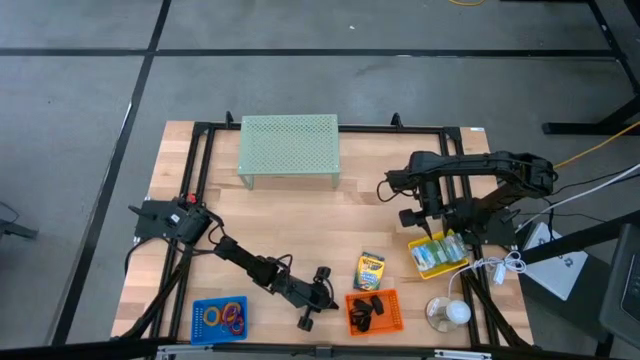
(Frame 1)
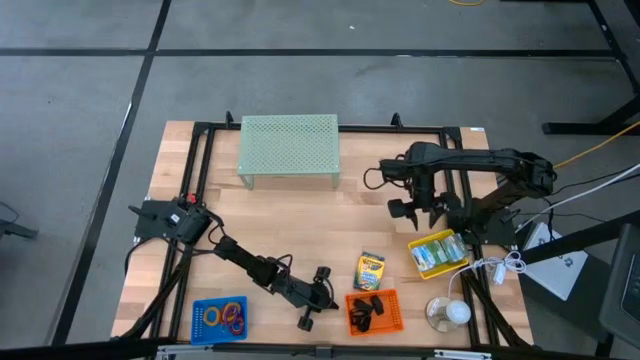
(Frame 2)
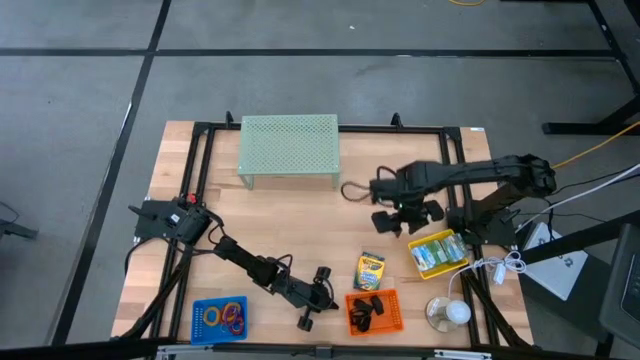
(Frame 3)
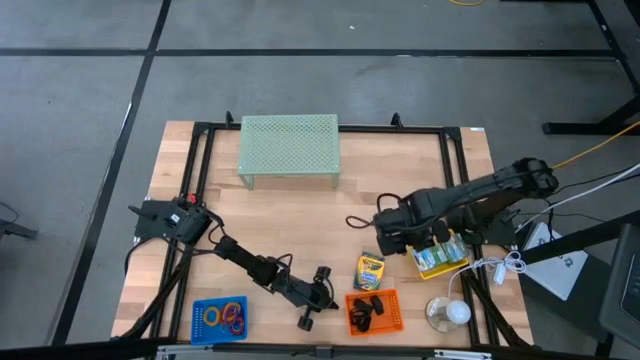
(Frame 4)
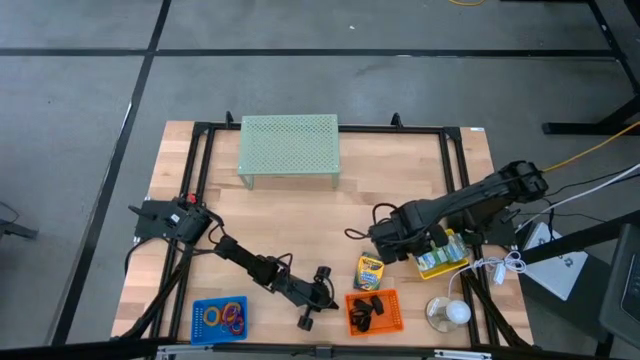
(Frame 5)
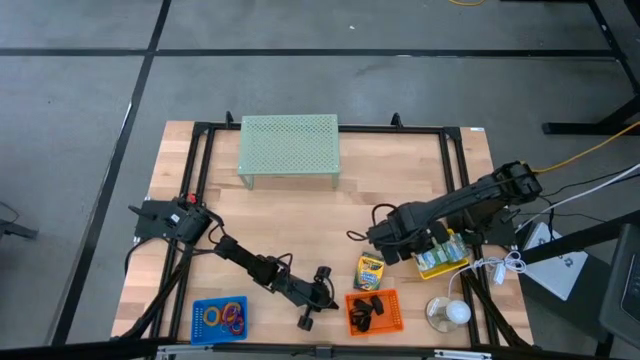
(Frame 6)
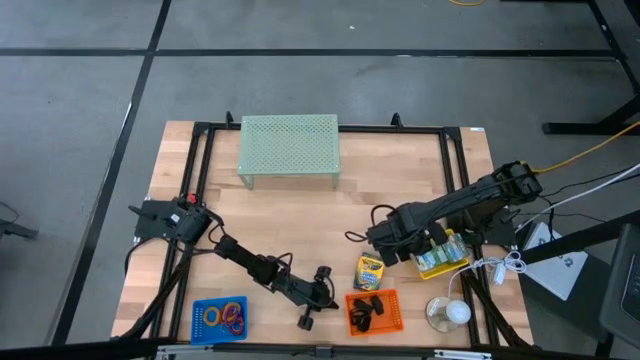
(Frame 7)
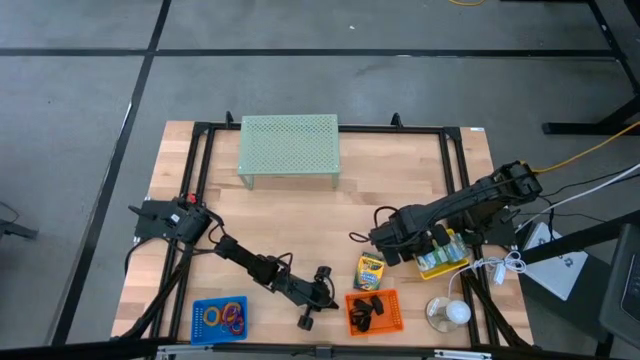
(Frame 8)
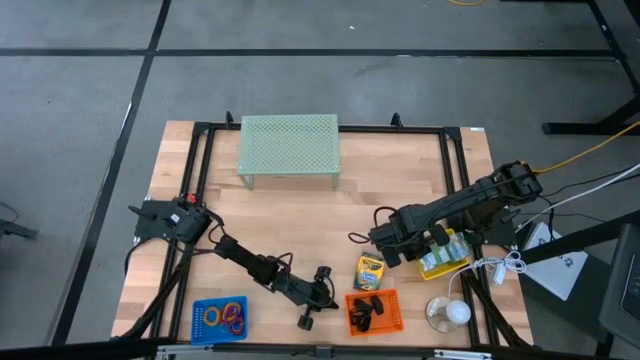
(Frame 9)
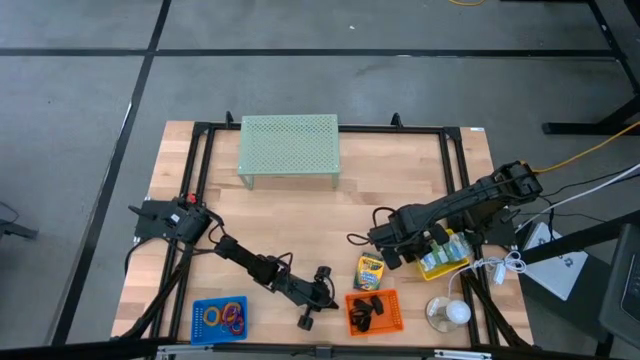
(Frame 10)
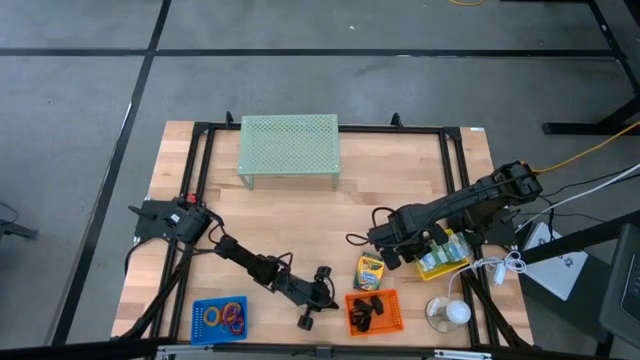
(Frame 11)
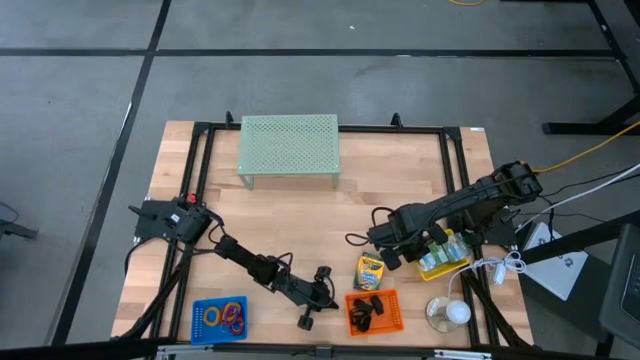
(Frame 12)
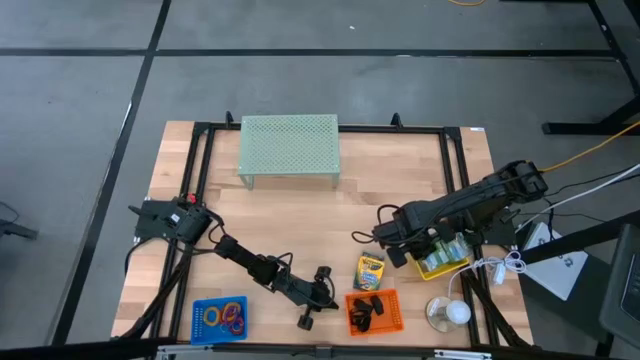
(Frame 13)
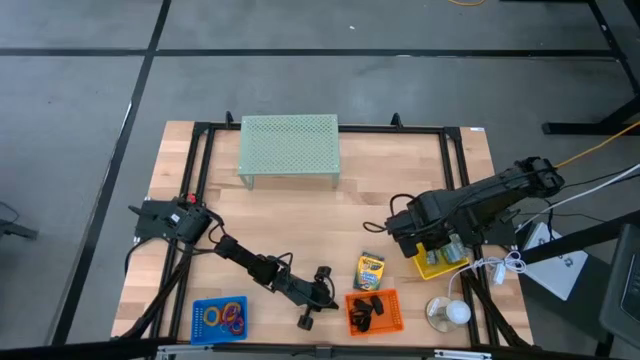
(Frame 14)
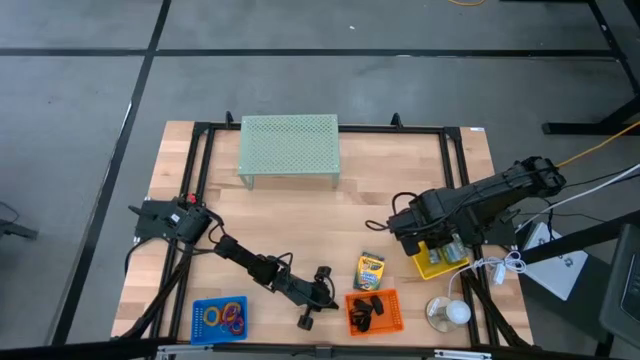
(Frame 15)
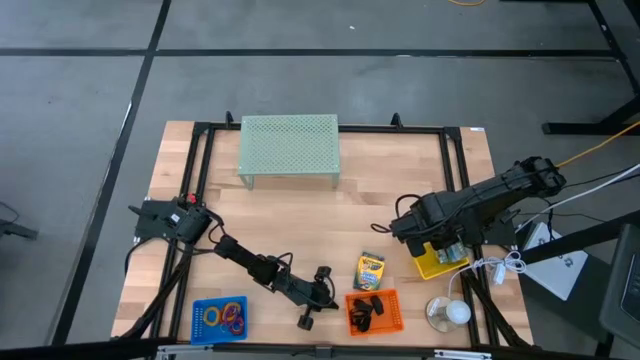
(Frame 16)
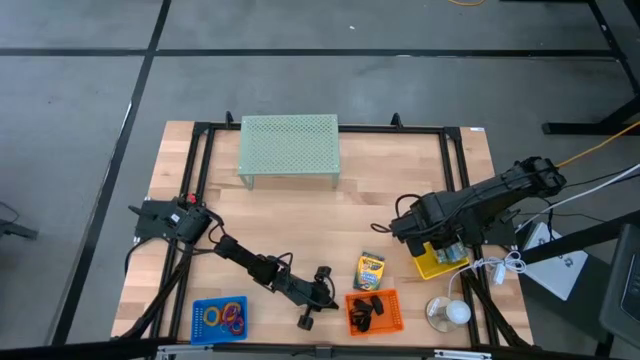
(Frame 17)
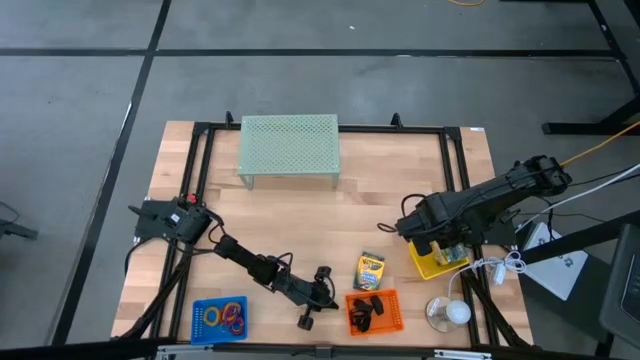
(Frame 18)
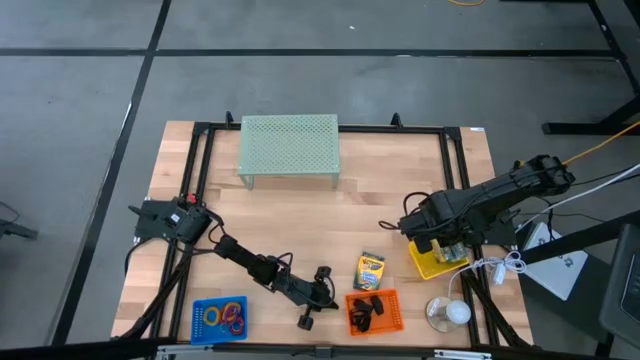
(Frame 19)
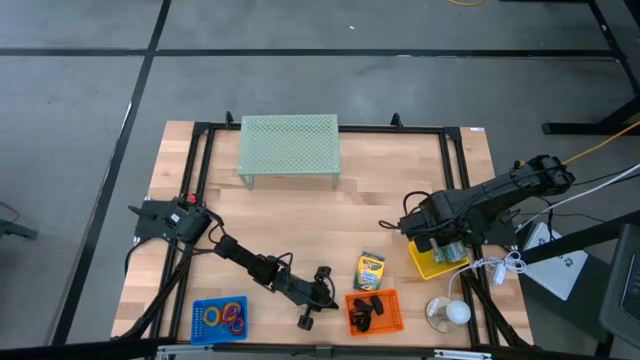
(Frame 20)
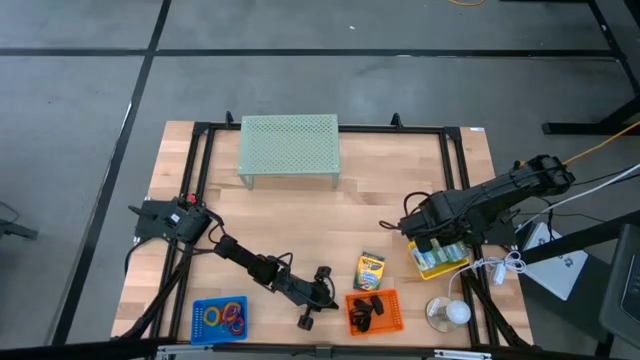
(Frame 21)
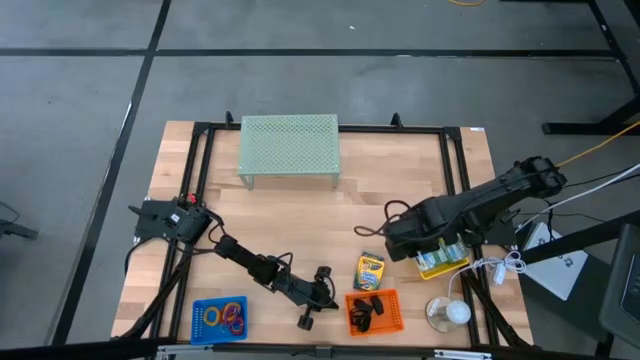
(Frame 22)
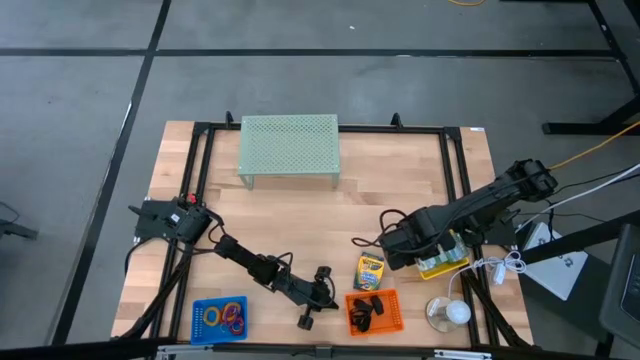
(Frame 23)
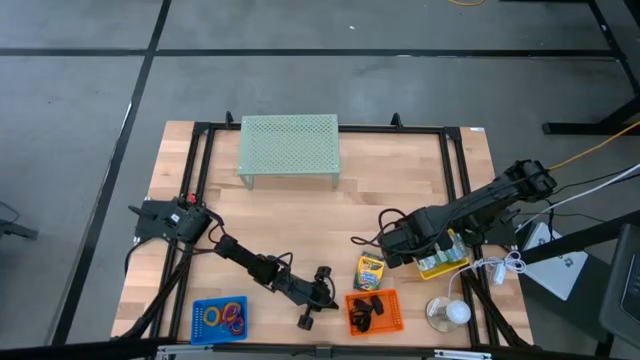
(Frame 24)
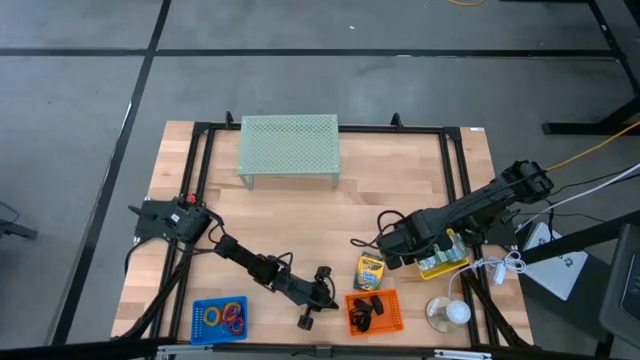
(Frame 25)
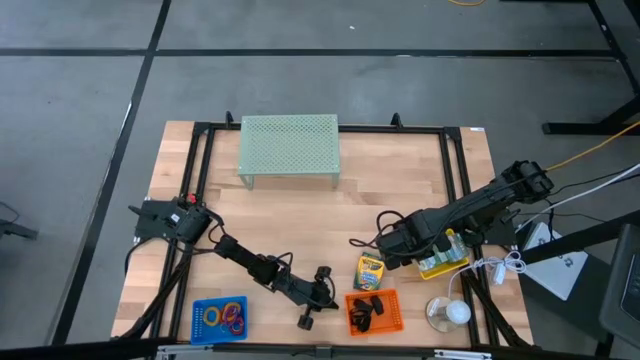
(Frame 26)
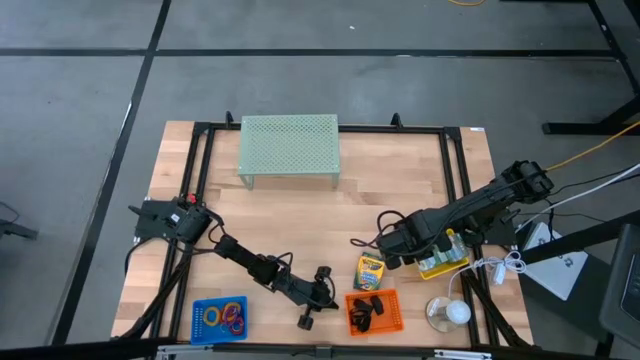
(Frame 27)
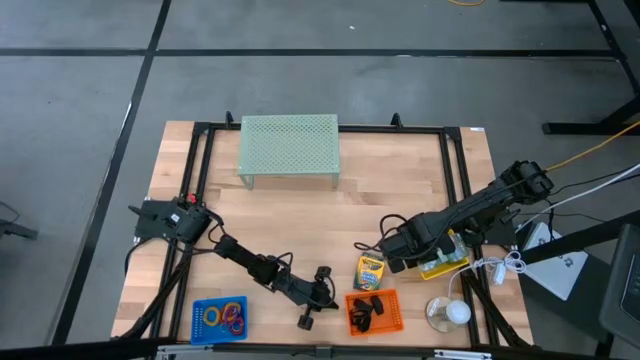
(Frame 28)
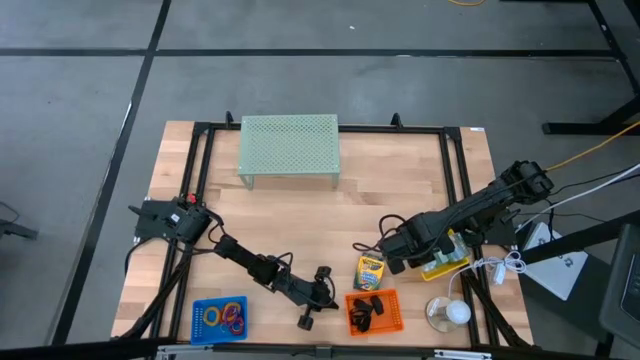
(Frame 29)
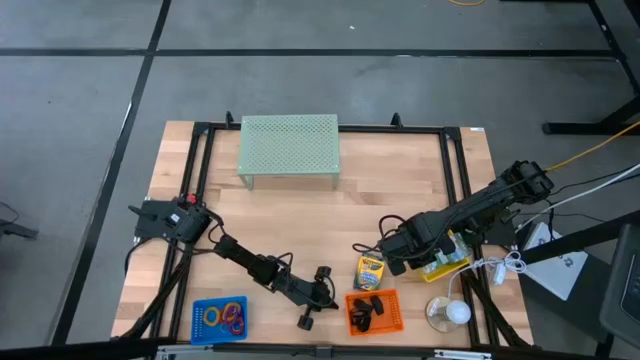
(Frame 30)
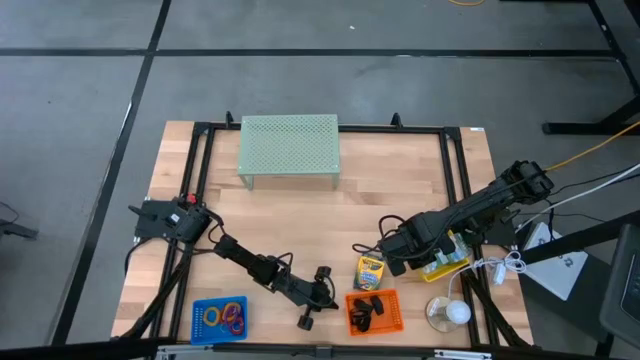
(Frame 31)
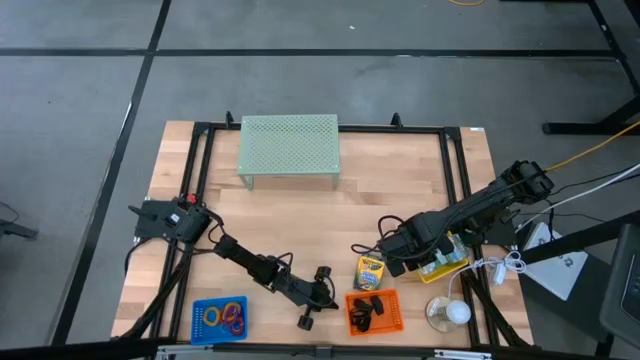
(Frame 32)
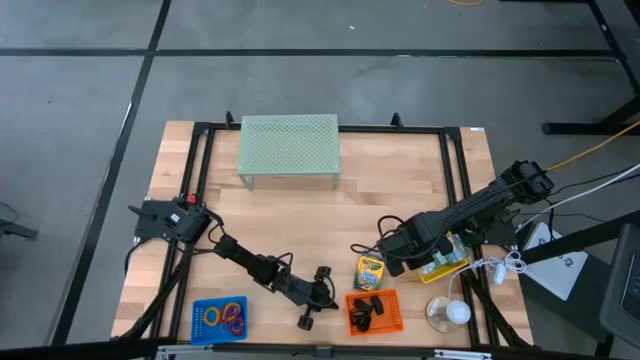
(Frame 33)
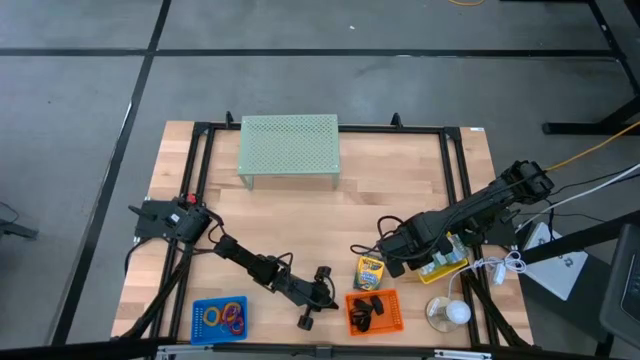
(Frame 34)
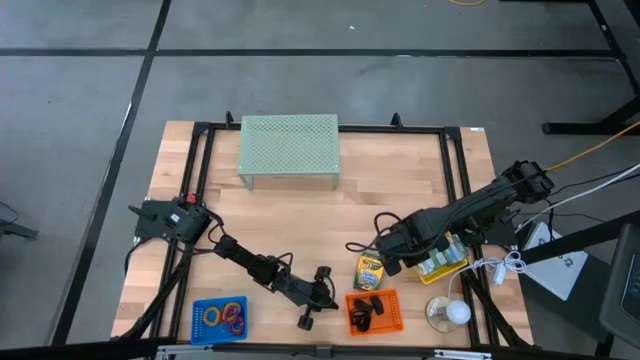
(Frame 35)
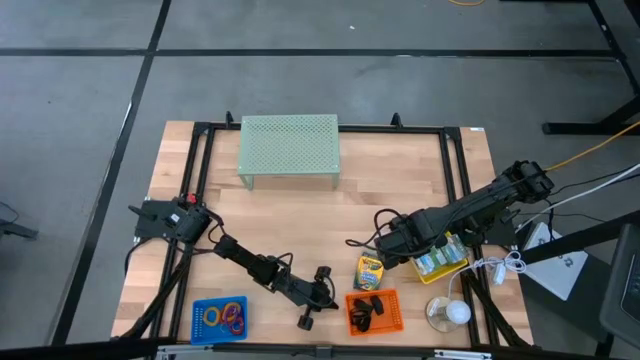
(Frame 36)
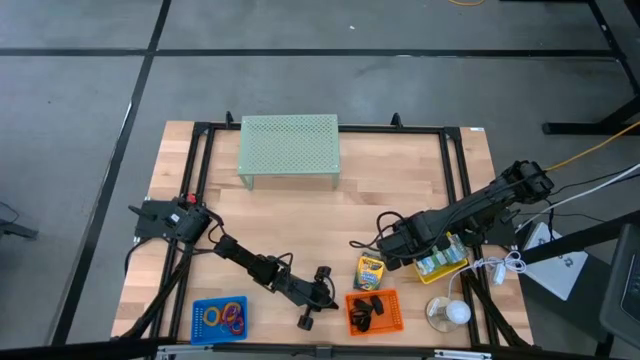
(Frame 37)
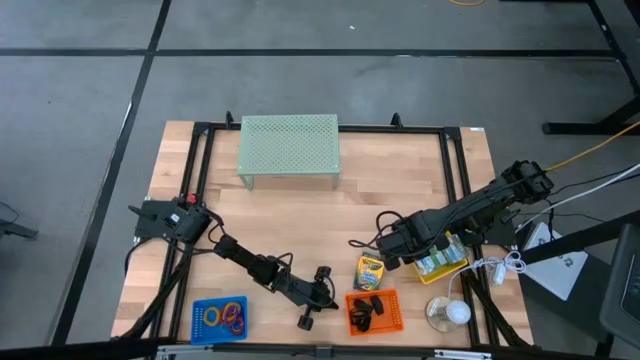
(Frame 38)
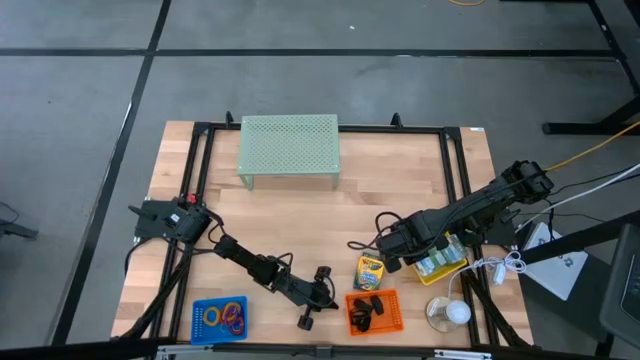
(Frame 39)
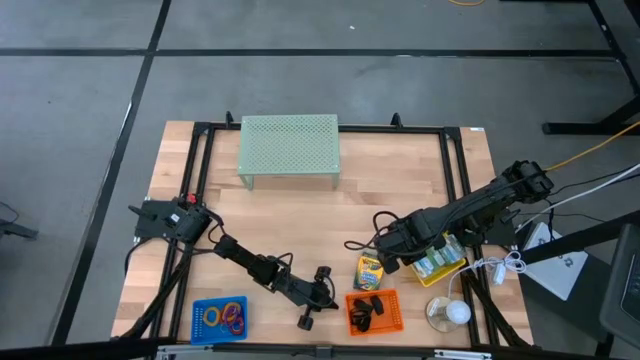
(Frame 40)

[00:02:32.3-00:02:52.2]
Task: Pick & Place Office Desk Supplies
Put the box of crayons into the yellow bin

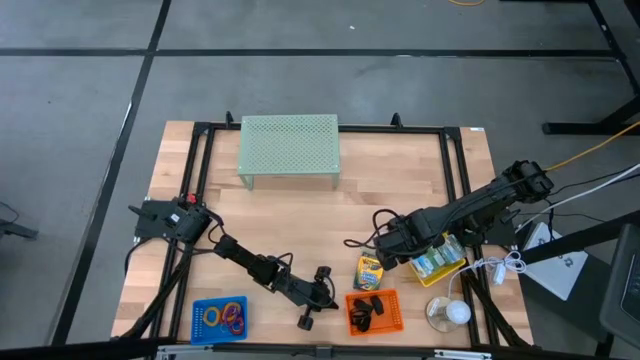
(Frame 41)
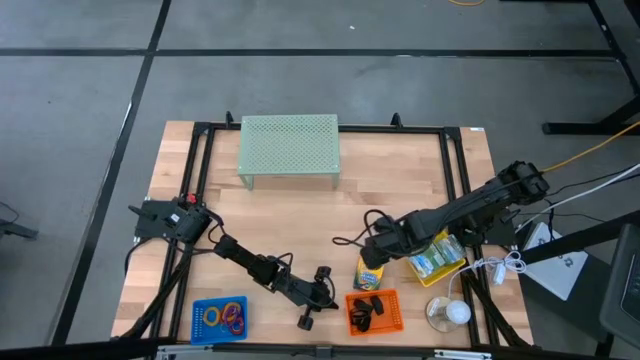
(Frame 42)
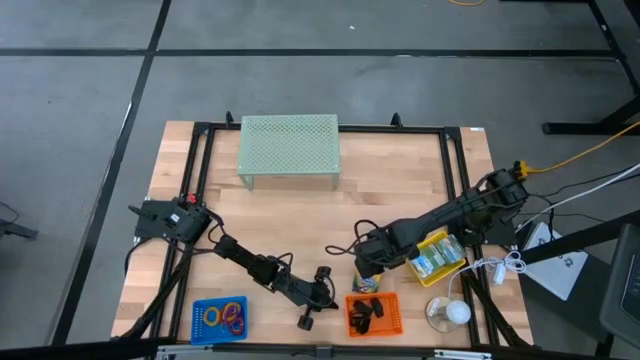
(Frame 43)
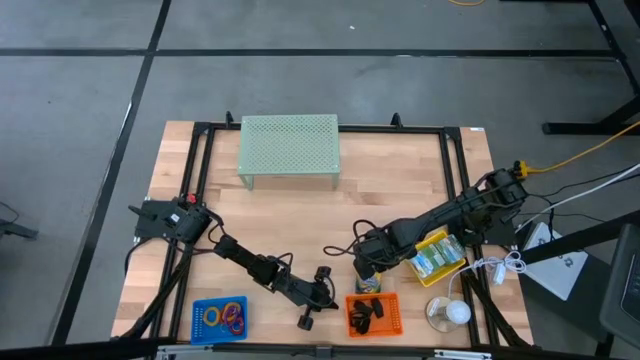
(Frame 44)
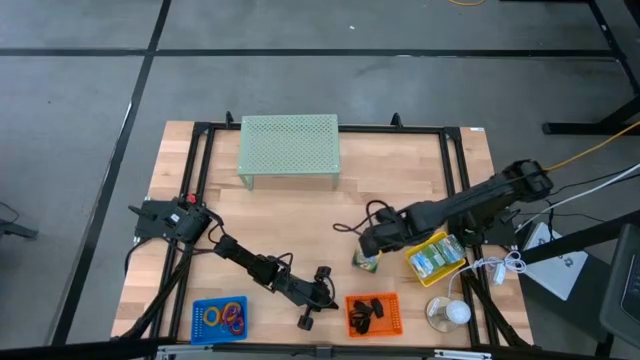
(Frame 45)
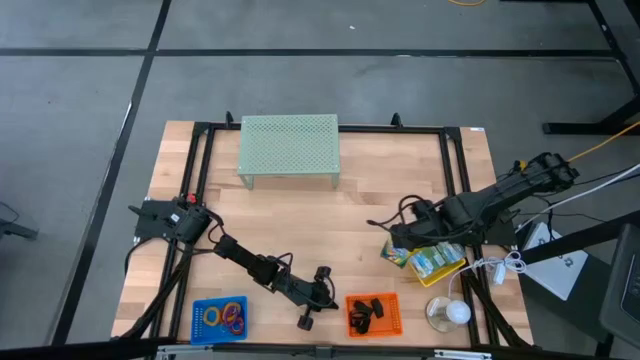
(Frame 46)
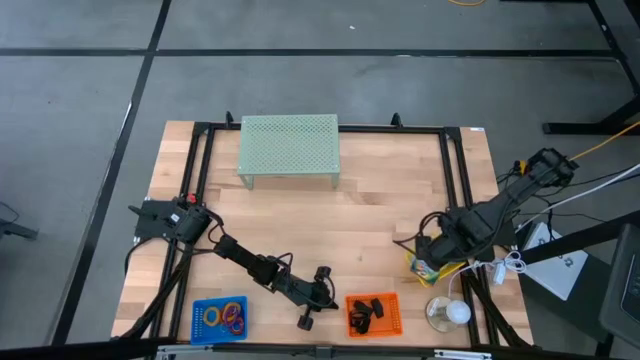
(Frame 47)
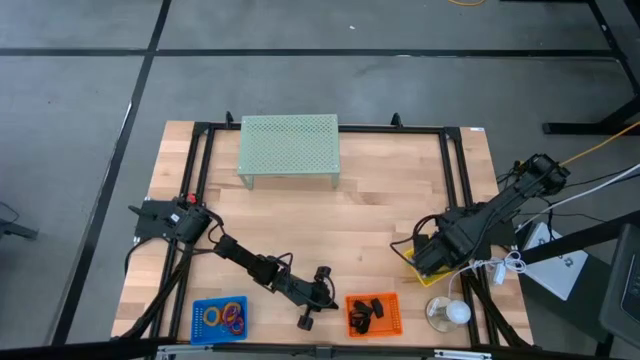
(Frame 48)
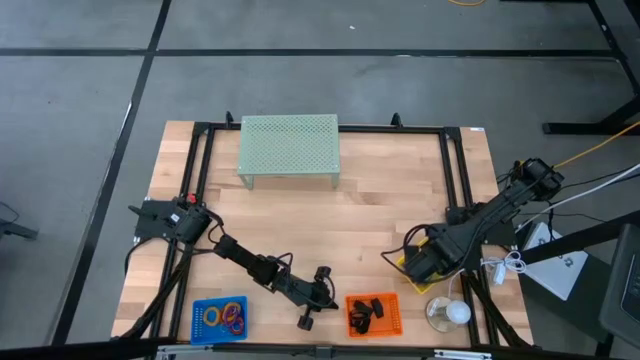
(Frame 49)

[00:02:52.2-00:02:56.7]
Put the box of crayons into the yellow bin
